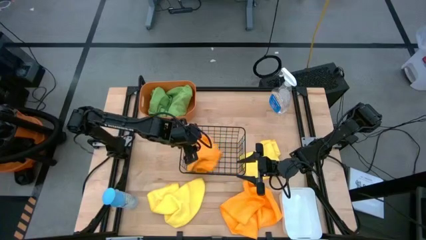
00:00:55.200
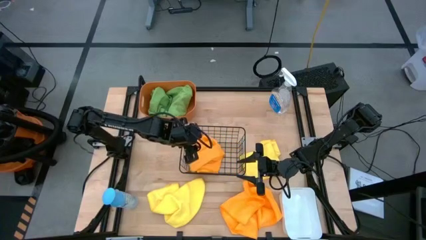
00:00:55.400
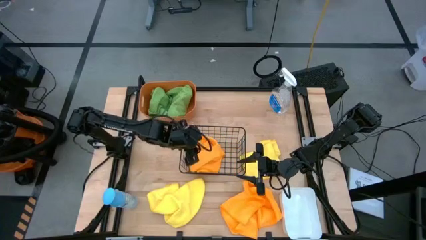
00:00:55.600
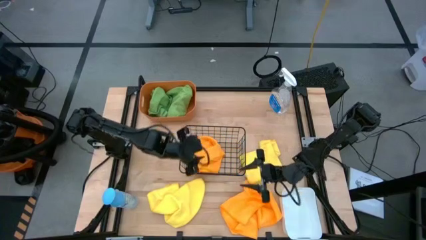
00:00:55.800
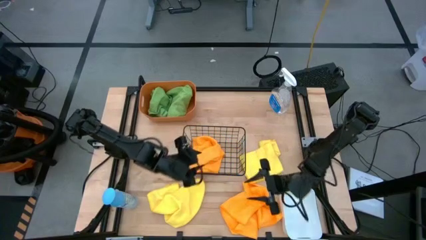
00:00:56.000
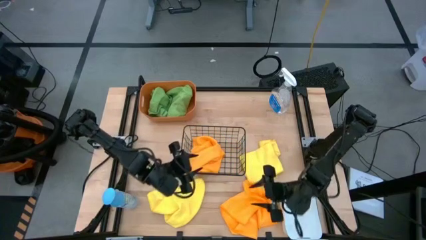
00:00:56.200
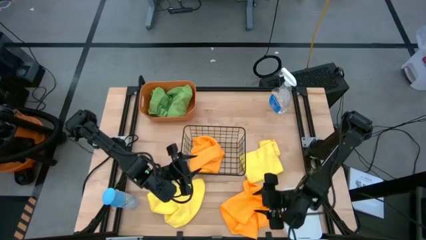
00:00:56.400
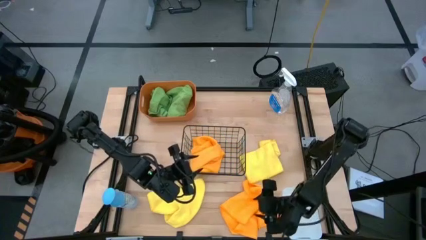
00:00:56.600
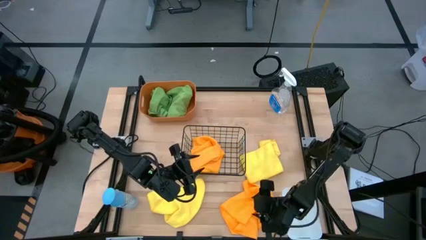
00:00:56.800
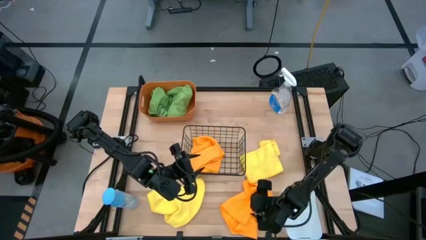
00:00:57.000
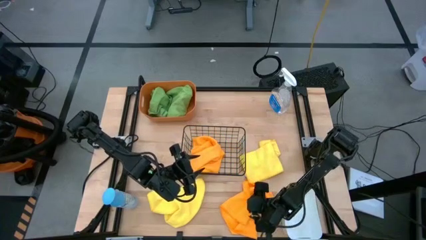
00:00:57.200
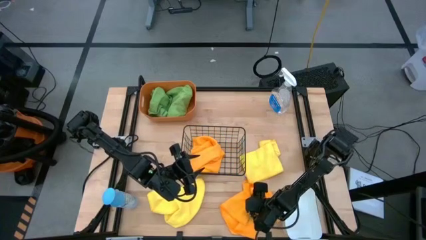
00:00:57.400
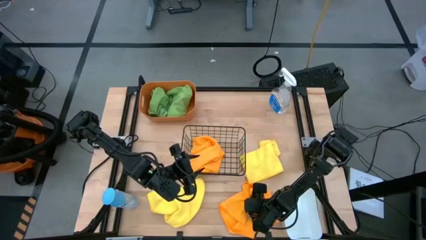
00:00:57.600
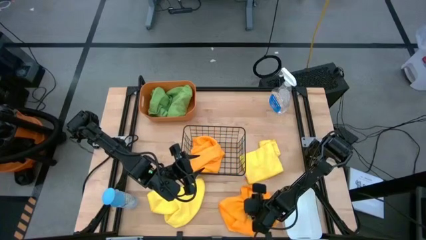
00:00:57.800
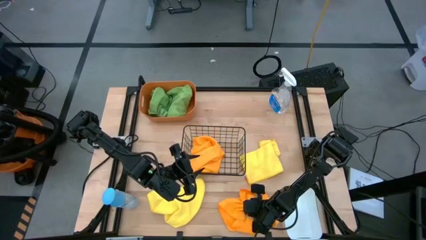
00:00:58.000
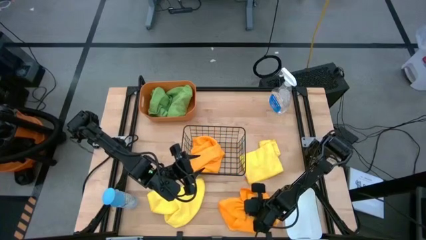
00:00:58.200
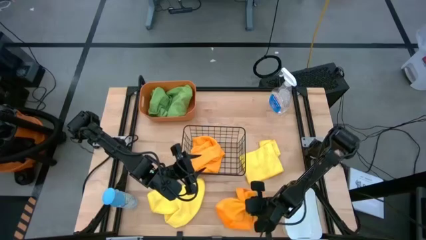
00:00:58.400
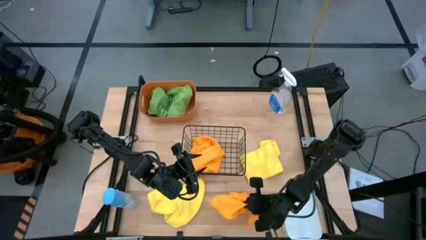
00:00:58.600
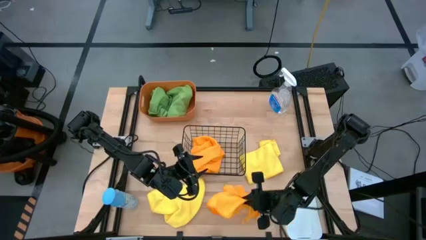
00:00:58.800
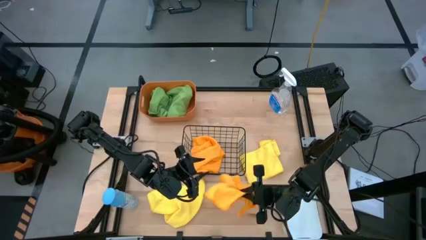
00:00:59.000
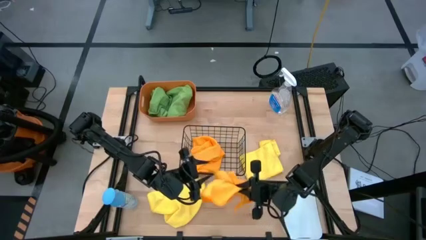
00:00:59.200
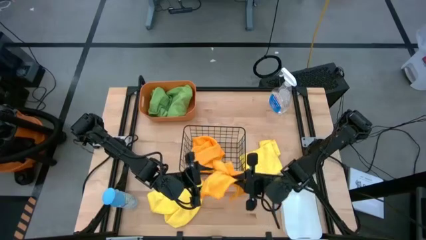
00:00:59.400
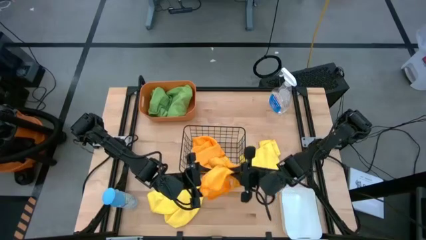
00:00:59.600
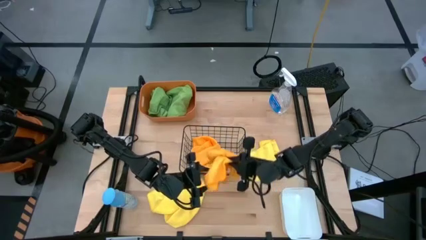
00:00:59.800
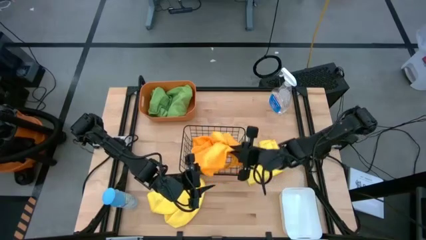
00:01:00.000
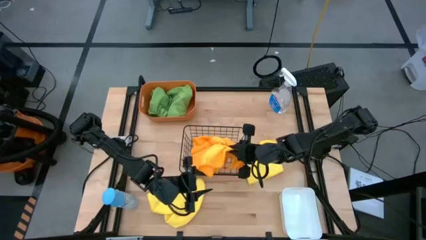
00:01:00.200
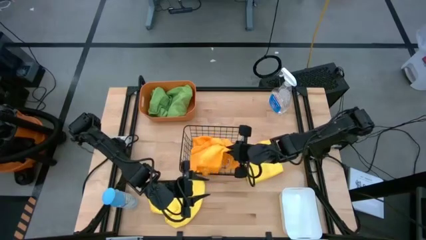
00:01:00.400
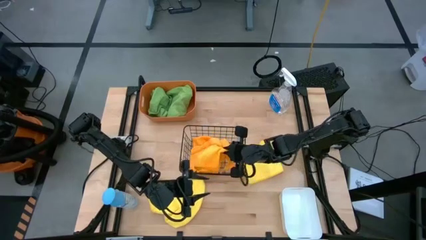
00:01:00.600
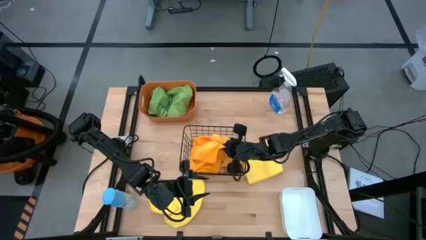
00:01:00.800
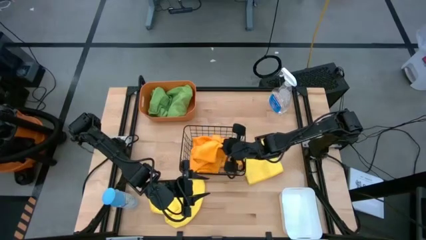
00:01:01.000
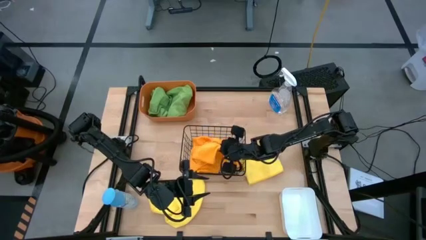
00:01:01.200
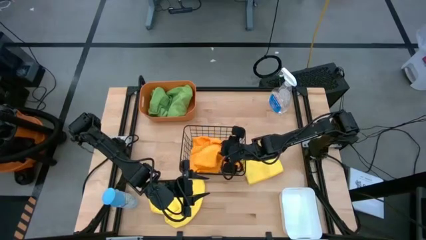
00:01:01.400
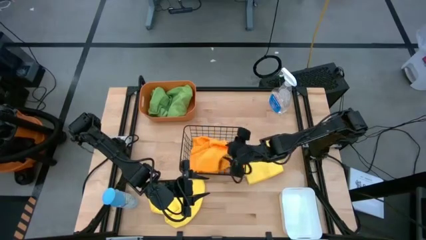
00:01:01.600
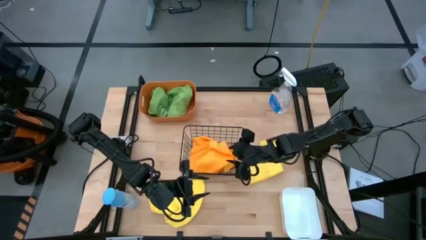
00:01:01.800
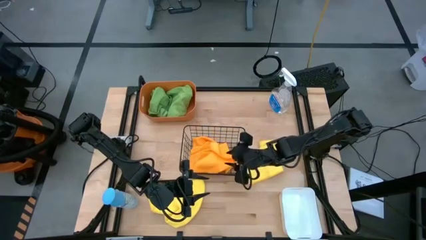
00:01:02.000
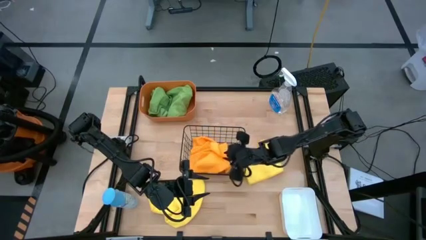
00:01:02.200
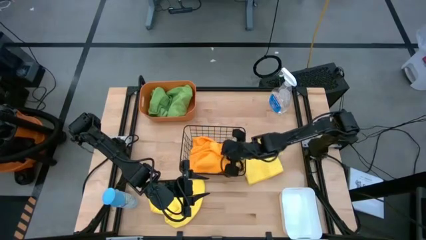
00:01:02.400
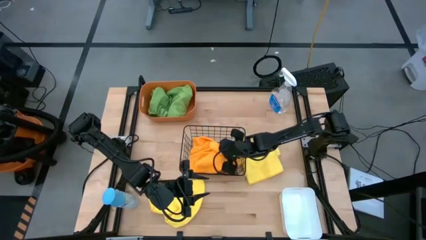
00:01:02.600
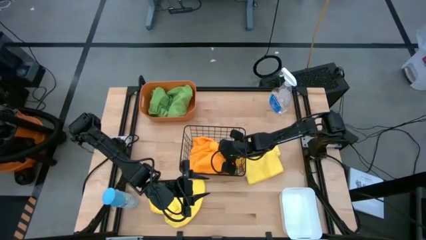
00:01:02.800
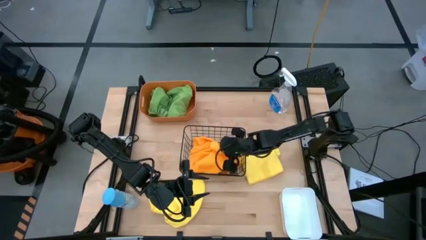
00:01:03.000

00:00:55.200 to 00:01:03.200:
Task: Sort microfiber towel by color & place in baskets
Put the orange microfiber cloth into the black wire basket

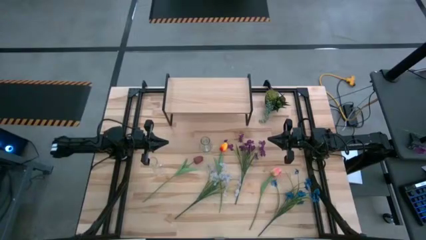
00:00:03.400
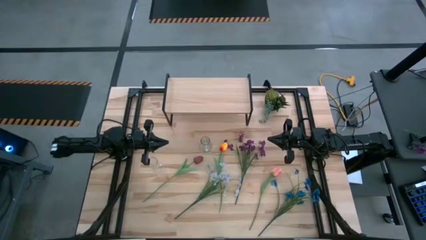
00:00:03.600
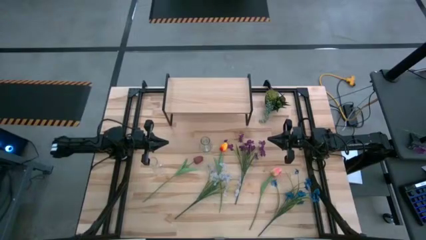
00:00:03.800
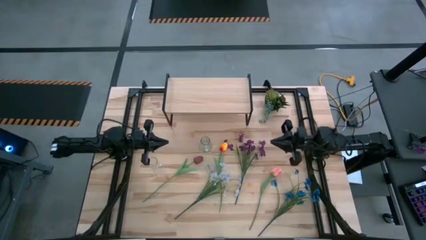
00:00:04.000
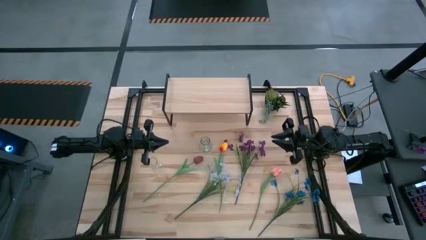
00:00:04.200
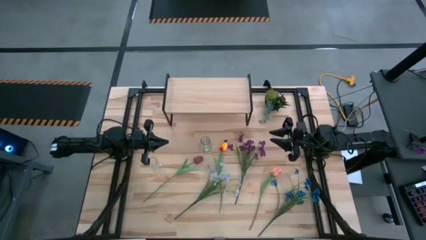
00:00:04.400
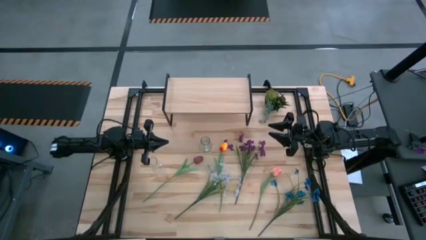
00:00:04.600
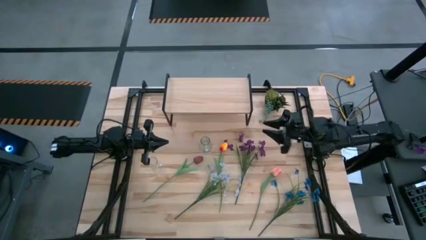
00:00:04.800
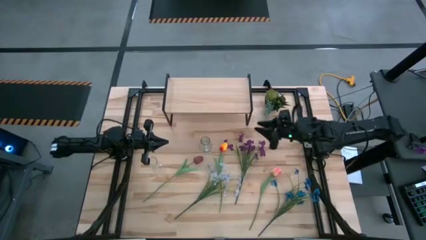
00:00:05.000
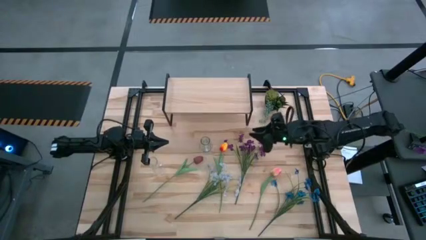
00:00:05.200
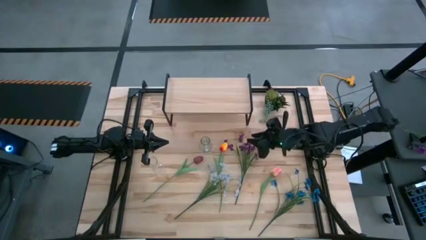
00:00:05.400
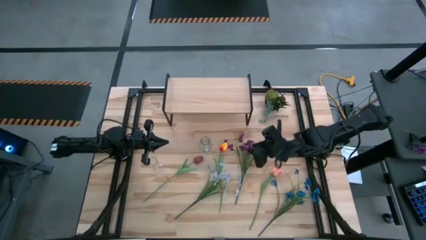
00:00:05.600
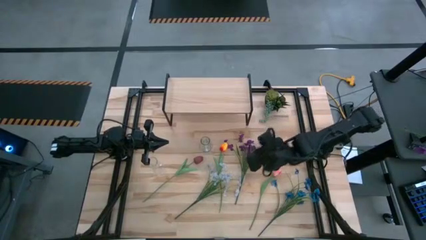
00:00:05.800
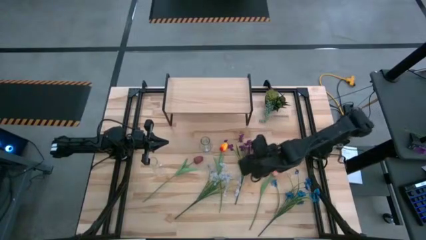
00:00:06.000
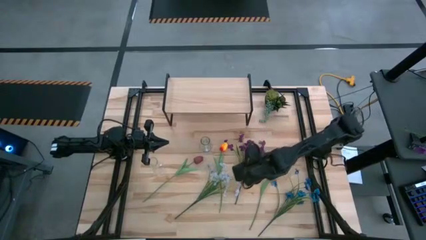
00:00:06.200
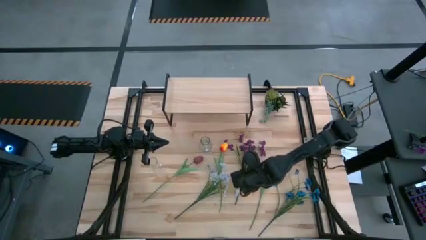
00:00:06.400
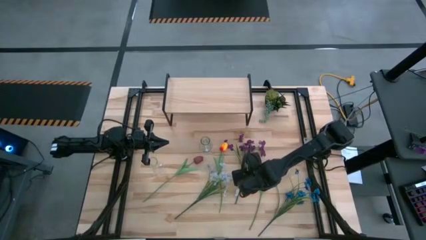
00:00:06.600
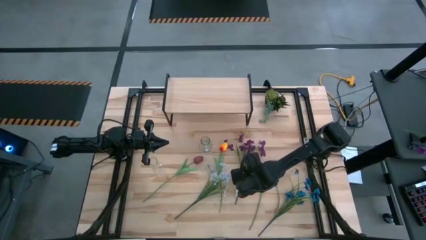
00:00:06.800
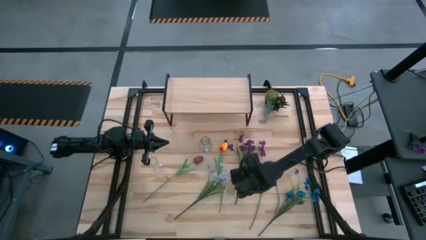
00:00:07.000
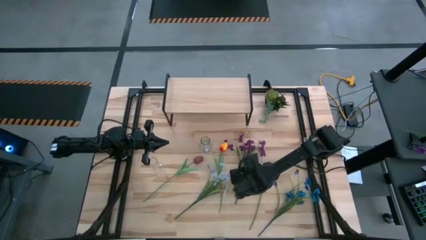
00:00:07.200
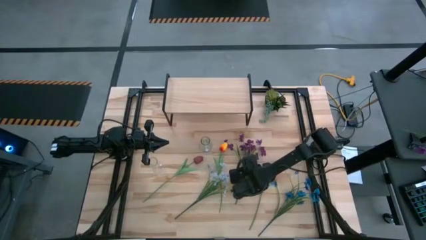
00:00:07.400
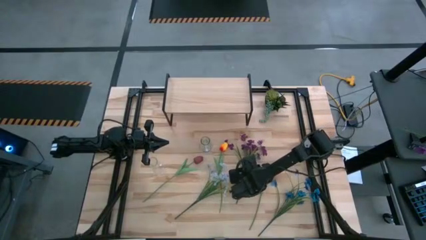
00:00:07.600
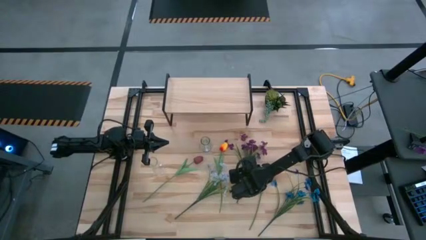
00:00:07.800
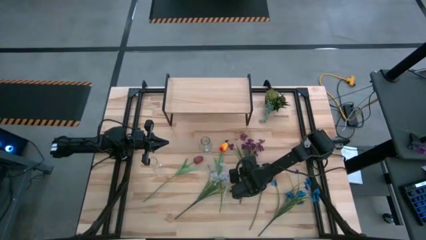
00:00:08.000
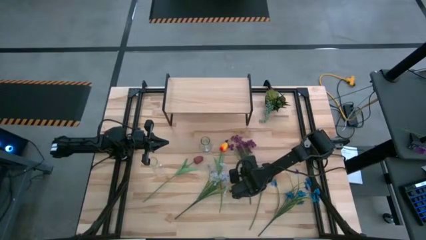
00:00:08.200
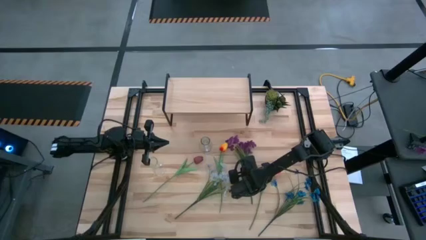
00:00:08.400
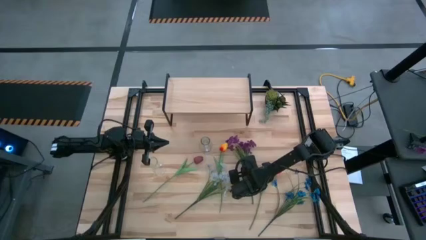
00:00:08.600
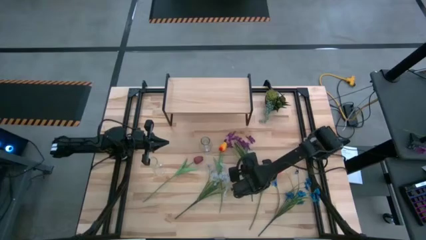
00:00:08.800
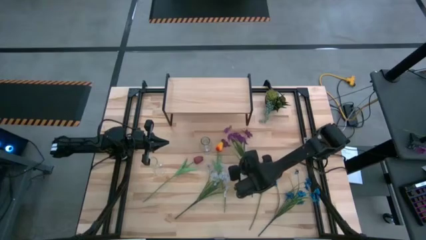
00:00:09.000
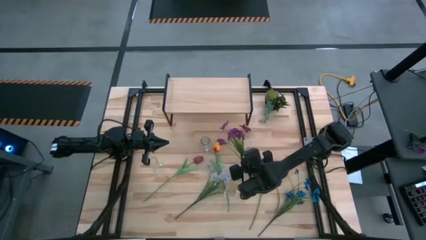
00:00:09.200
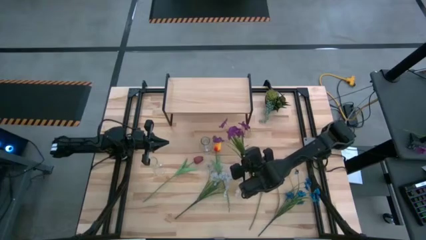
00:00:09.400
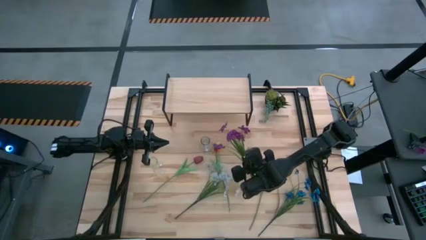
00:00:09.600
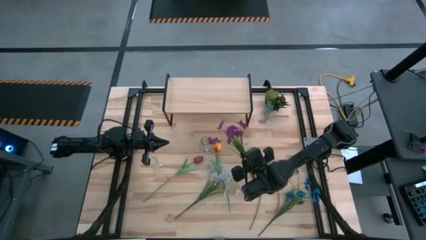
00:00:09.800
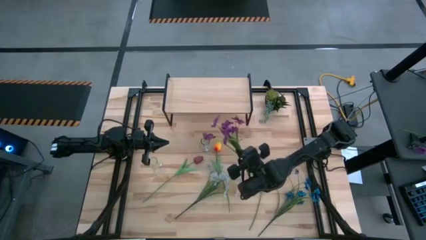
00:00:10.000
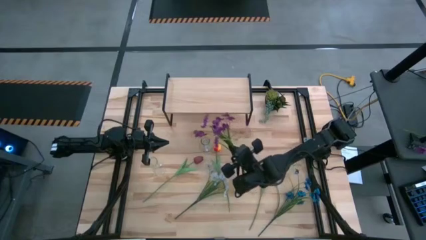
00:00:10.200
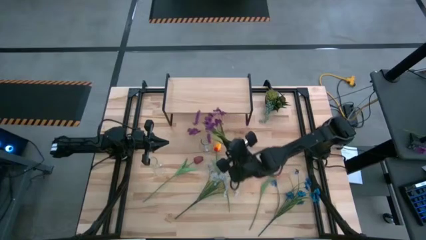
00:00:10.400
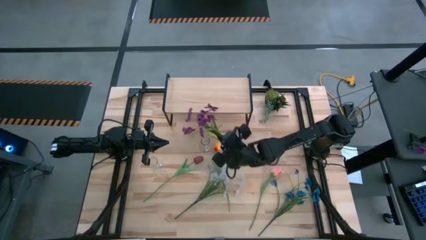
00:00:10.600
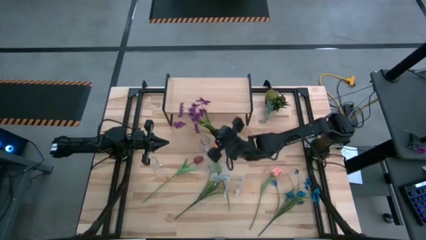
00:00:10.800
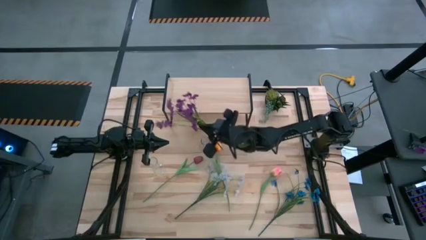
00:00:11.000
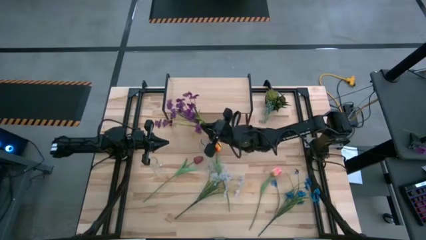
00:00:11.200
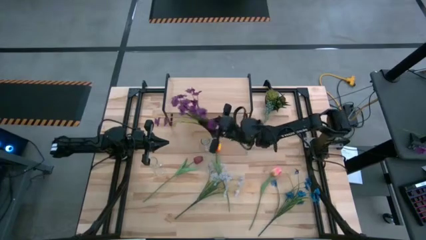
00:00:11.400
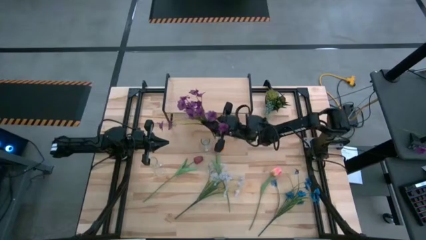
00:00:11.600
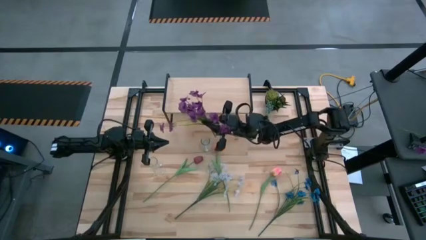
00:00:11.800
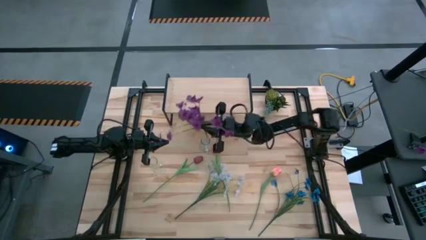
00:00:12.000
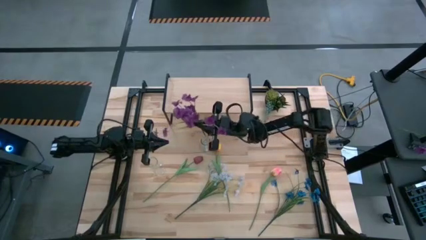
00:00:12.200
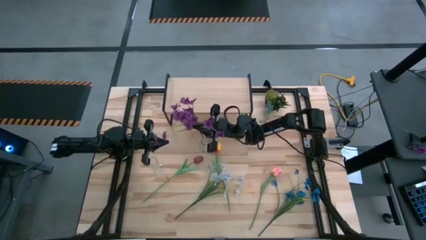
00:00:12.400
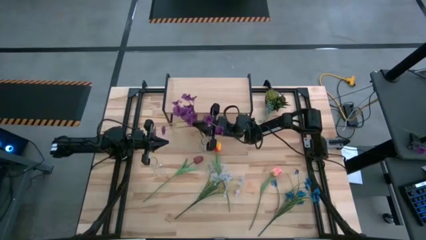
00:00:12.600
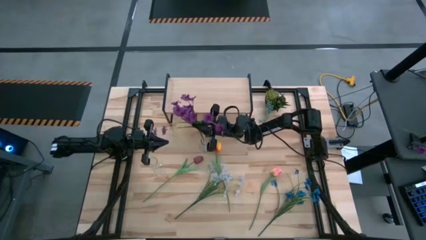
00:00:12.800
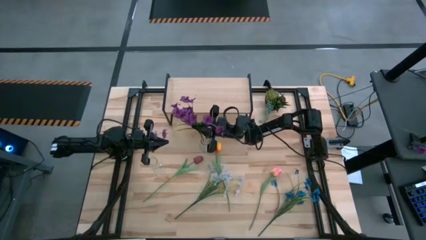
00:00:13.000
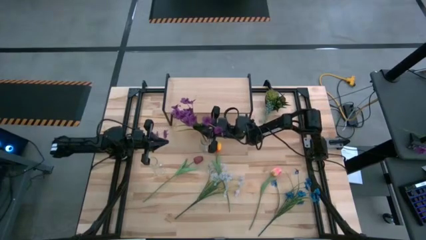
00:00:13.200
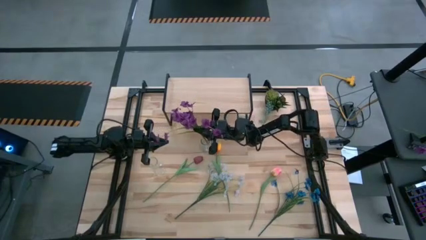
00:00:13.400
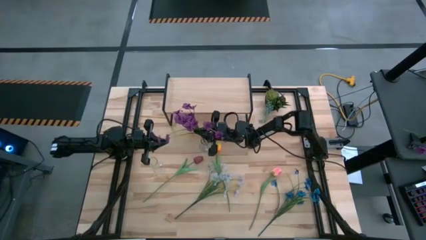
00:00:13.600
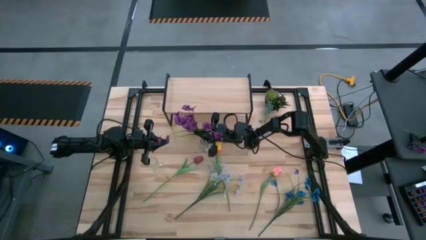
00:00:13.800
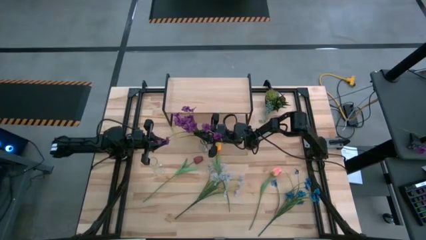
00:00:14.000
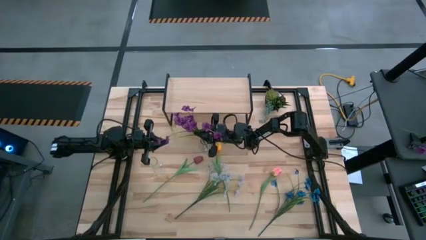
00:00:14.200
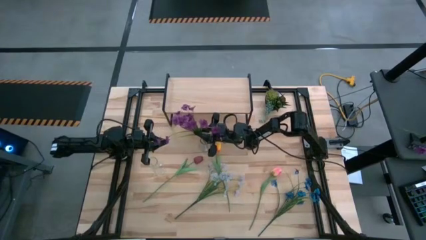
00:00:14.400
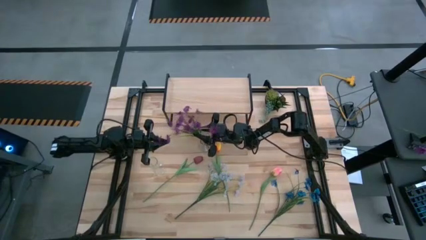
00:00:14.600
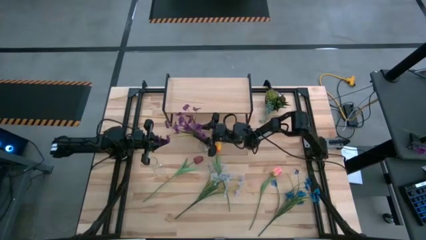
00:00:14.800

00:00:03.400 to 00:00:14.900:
Task: Pick and place flowers into a vace then onto a shelf
Put the purple flowers into the right transparent vase
